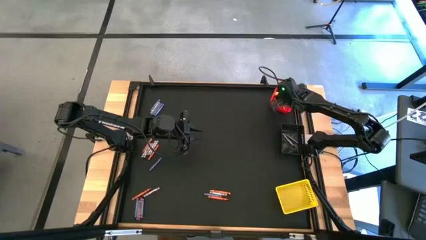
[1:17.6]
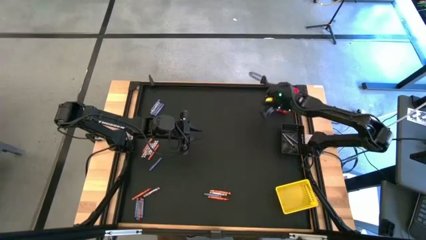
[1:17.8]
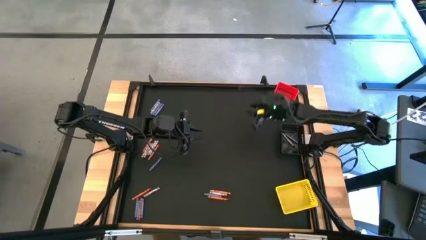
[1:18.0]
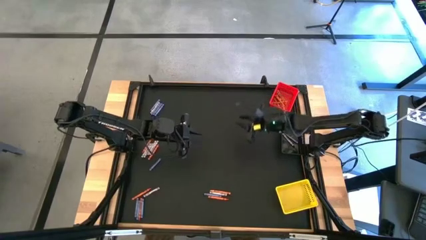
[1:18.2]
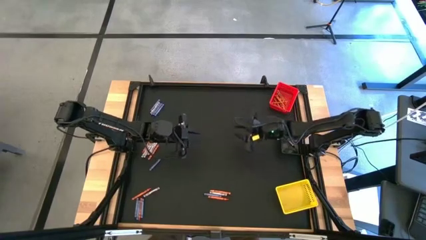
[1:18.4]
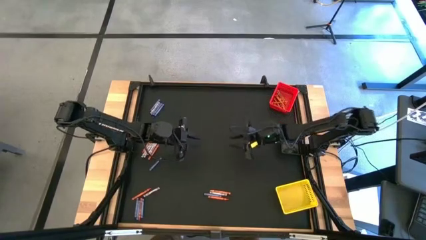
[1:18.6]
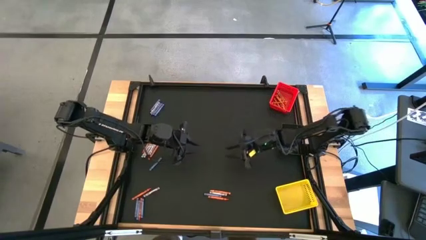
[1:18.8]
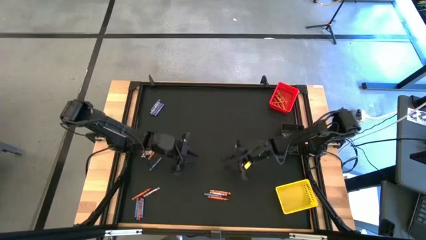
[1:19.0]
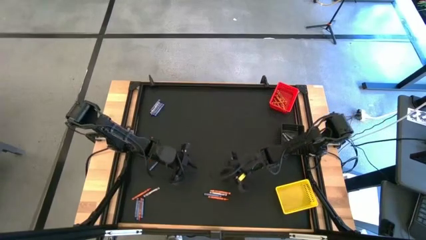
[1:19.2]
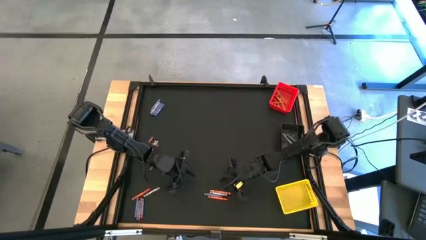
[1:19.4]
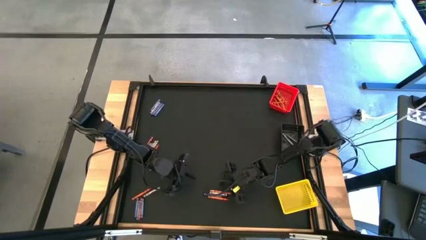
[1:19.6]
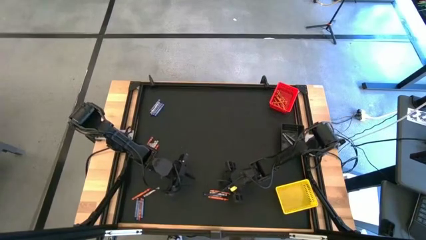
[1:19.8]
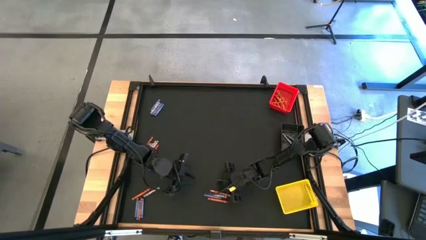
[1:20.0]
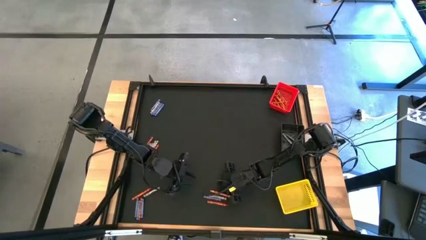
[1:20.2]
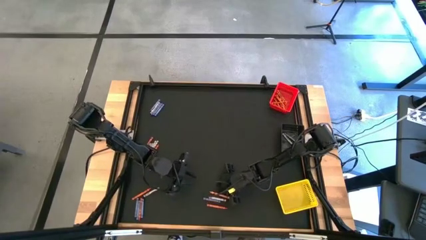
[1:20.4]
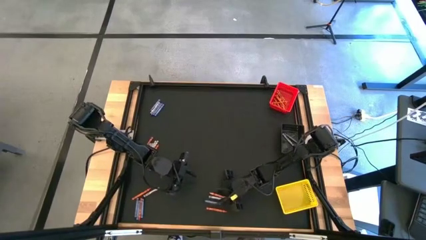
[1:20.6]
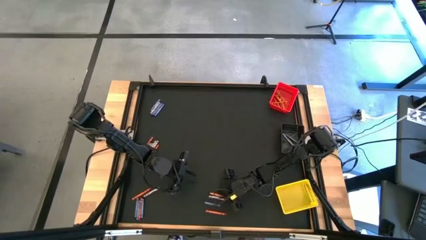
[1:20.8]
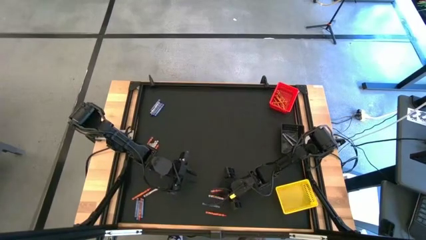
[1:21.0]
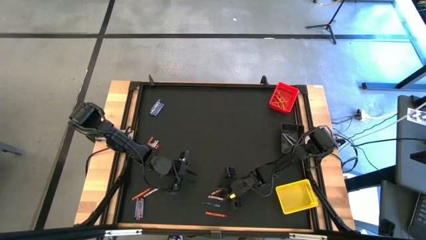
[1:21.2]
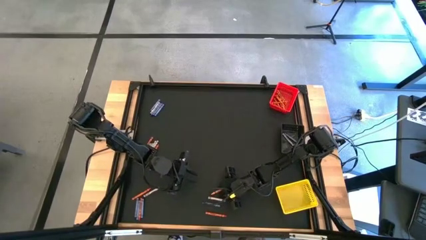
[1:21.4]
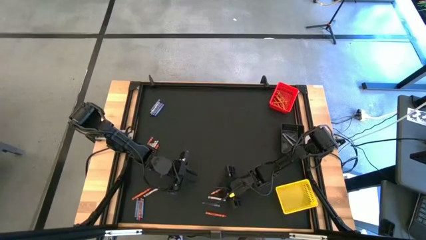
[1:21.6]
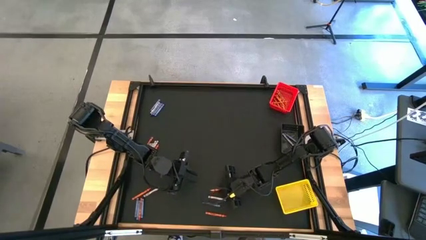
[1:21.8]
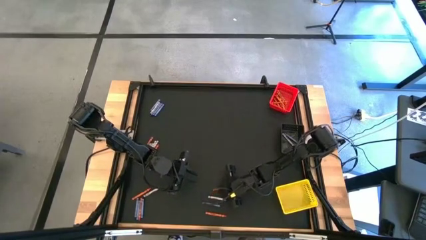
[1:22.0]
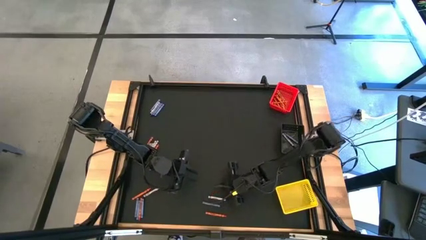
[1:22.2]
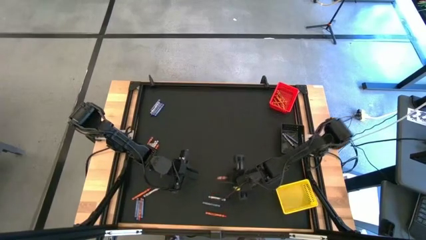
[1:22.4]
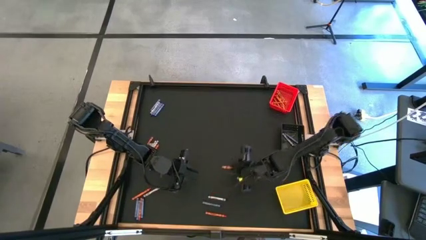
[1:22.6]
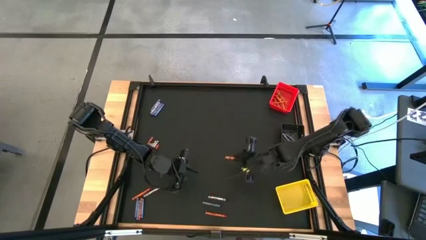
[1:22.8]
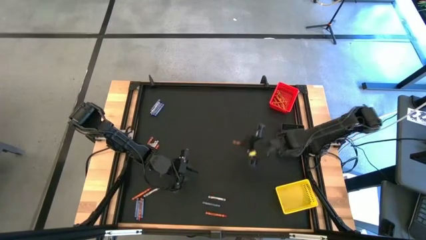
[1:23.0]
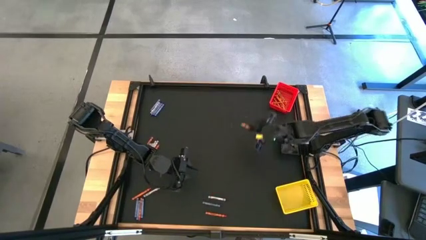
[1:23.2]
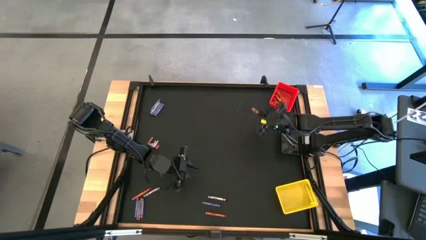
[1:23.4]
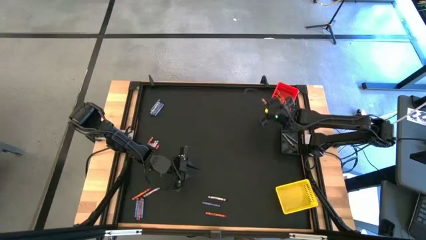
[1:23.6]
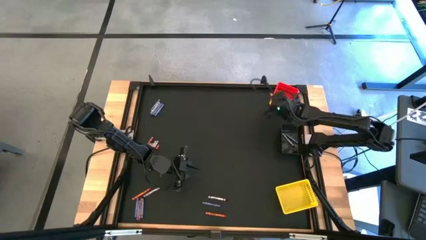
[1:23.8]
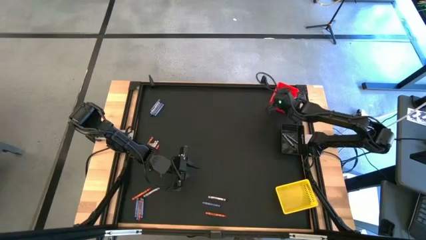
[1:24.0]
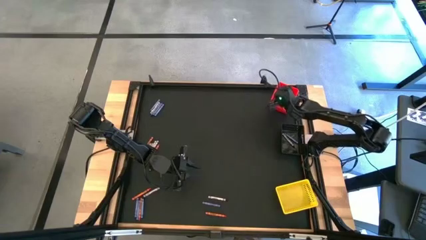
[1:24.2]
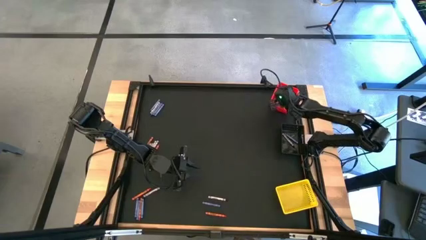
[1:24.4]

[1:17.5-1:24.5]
Task: Sort crayons
Put the orange crayon into the red bin

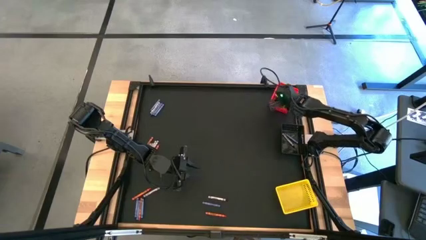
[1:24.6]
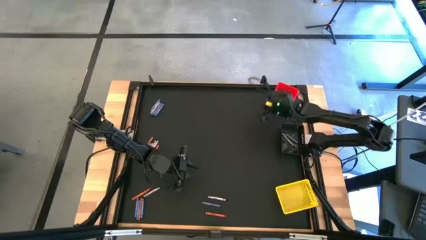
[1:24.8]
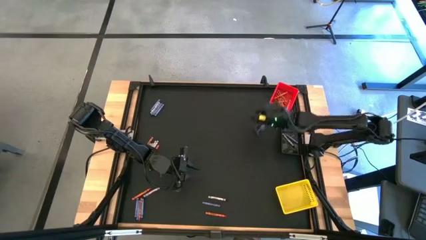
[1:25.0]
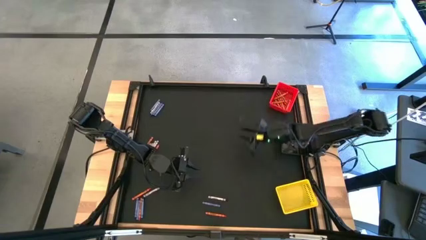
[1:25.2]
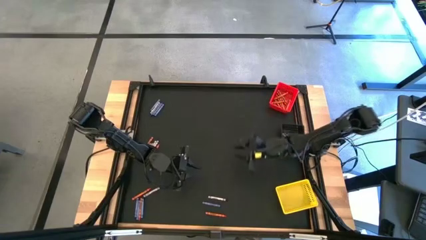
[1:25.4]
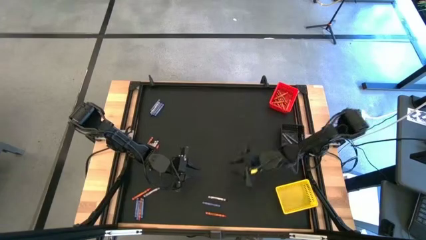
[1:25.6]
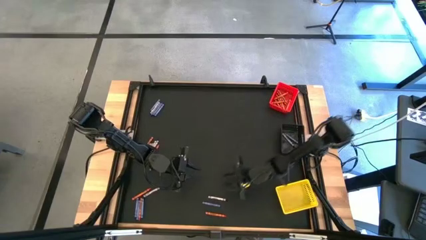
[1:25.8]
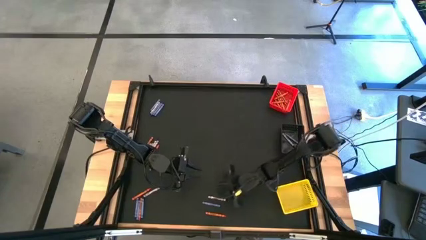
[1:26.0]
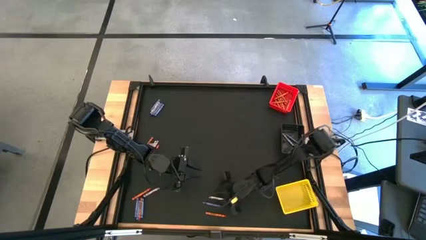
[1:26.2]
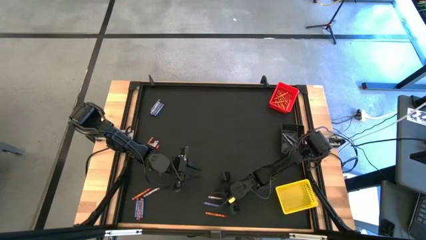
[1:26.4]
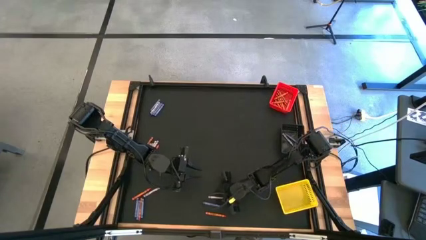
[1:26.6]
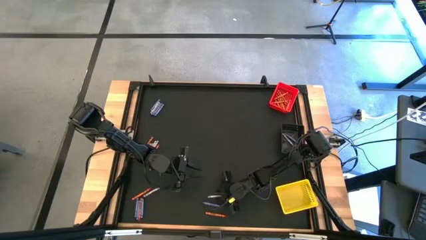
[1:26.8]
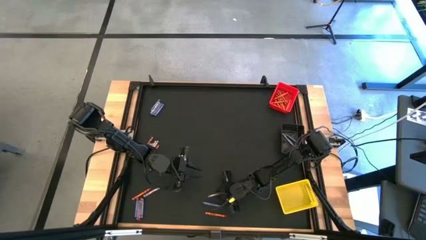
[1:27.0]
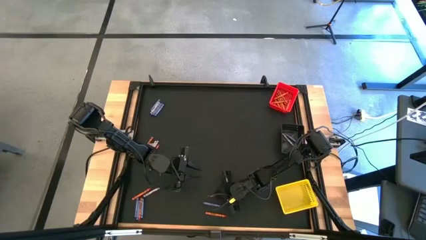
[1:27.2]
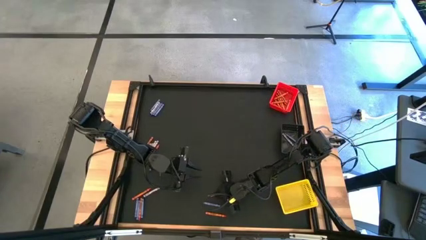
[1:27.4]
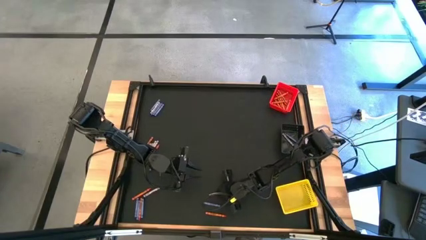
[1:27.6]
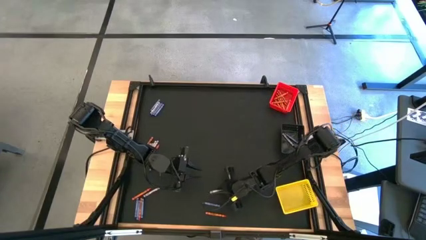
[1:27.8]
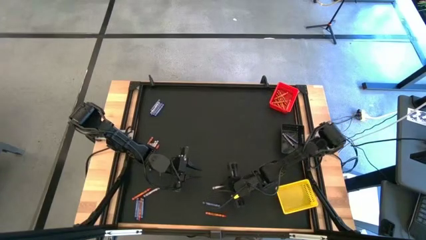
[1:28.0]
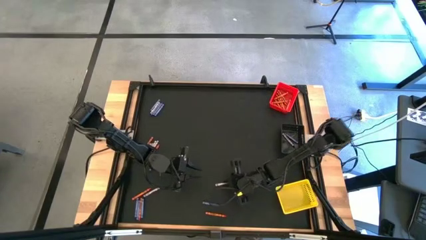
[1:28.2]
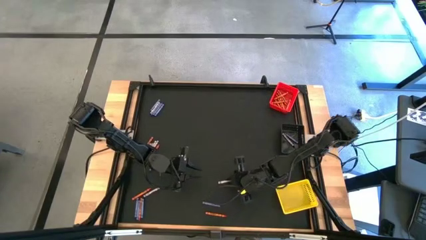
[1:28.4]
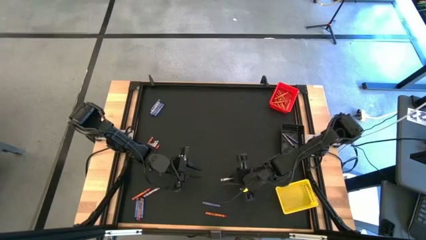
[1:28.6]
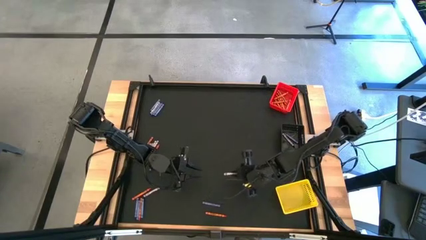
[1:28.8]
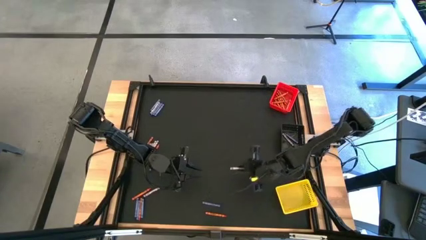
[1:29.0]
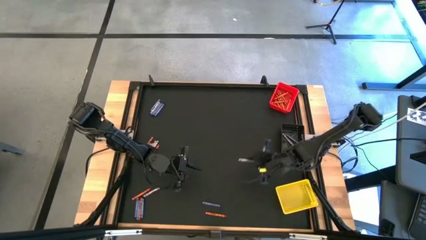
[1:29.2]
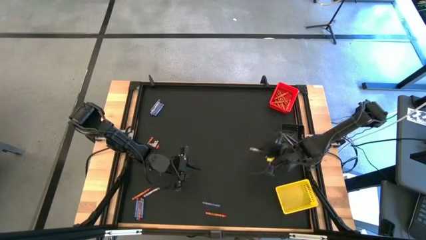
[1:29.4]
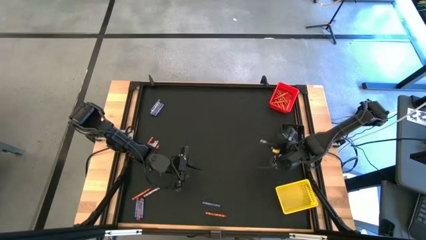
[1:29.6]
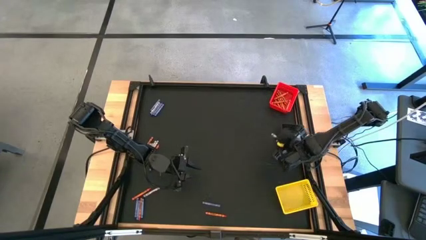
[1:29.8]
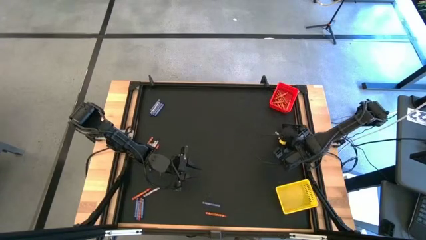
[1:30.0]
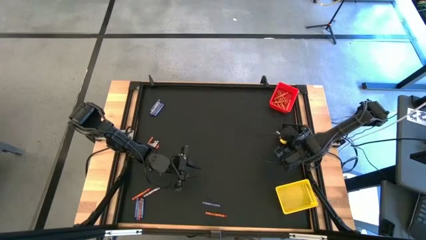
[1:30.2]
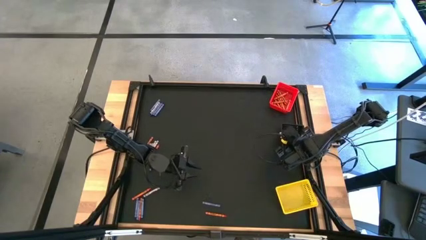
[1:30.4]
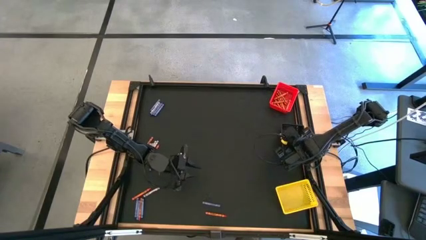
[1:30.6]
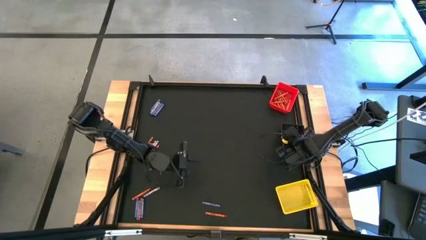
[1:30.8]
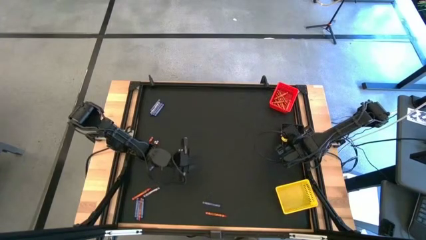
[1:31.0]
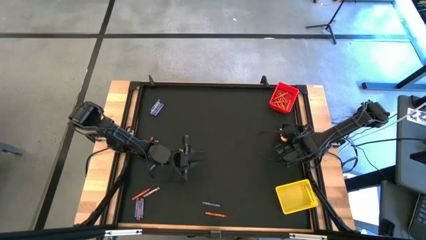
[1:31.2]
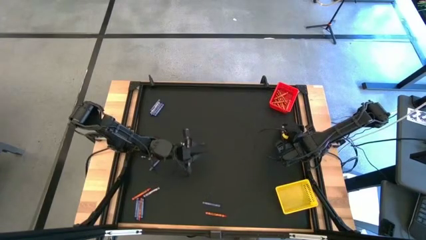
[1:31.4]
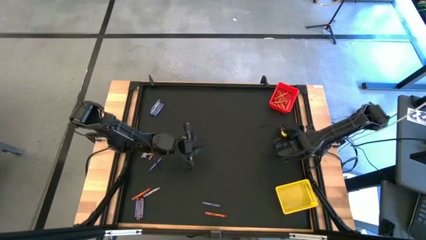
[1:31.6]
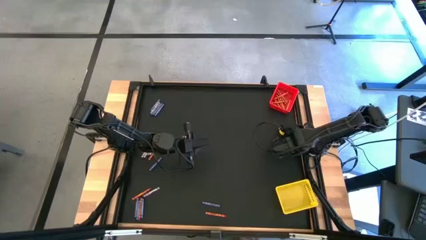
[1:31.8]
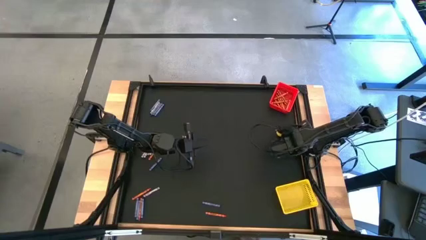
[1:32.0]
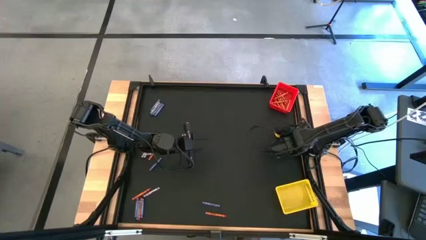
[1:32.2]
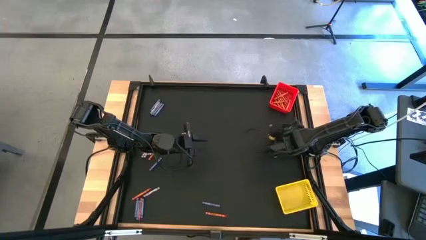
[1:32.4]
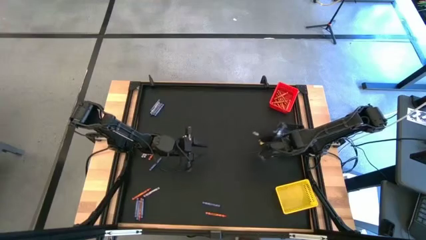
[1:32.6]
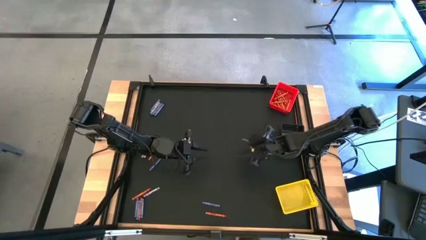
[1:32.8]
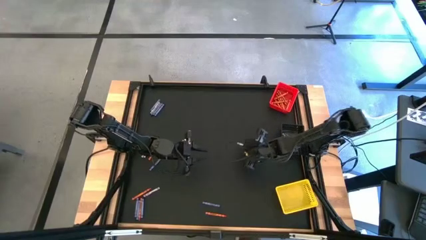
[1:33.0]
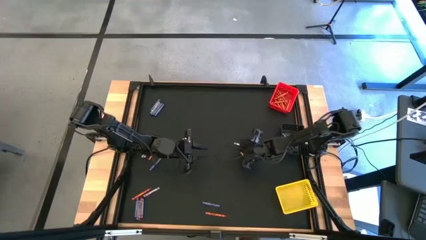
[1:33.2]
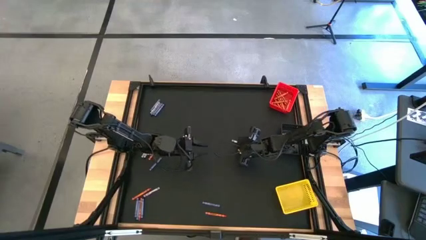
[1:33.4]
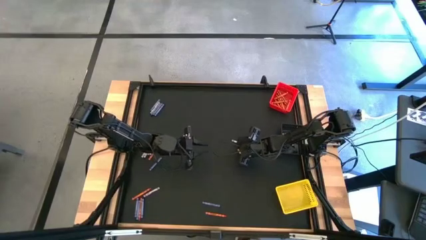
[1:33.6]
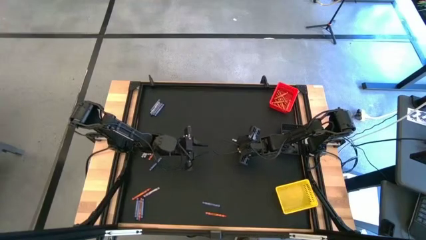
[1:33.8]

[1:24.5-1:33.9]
Put the black crayon into the black bin
